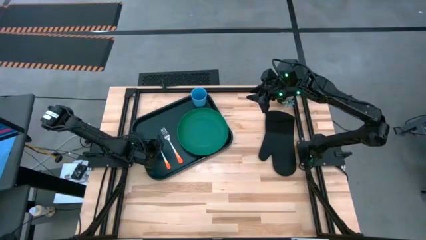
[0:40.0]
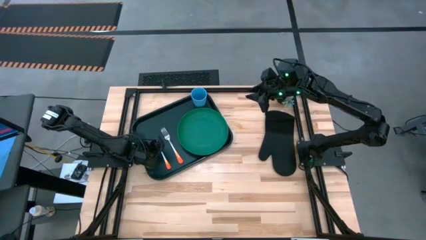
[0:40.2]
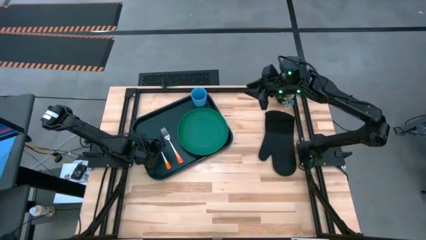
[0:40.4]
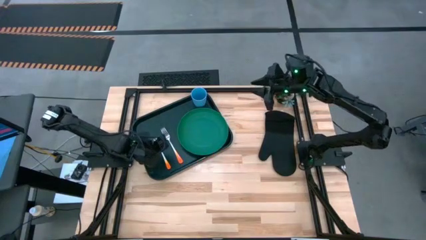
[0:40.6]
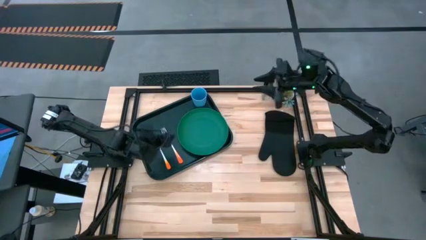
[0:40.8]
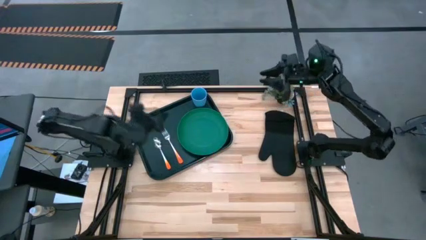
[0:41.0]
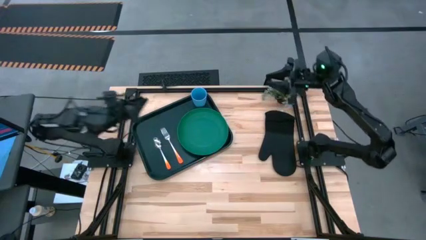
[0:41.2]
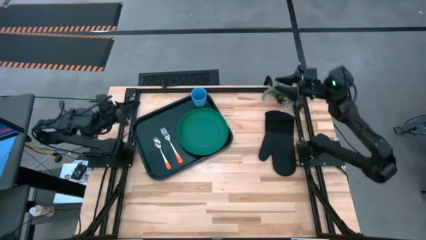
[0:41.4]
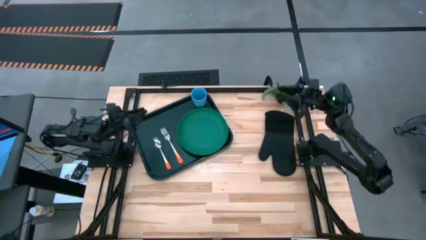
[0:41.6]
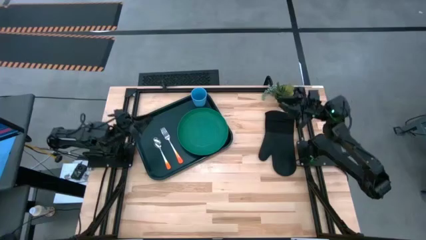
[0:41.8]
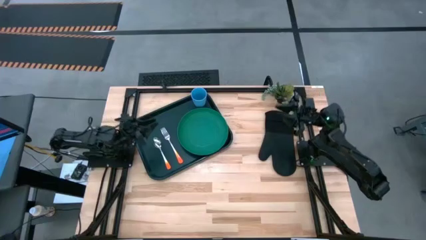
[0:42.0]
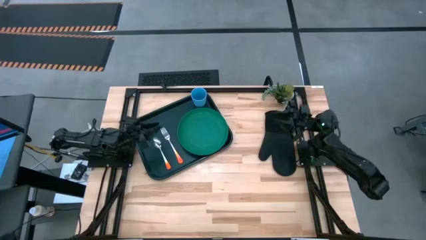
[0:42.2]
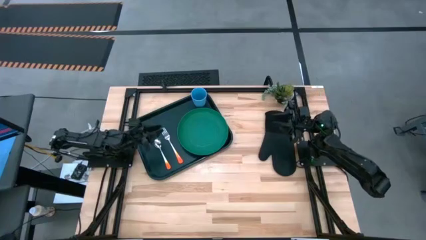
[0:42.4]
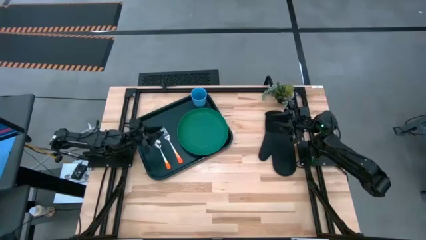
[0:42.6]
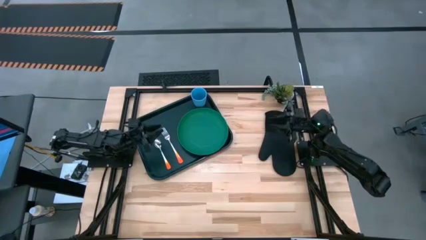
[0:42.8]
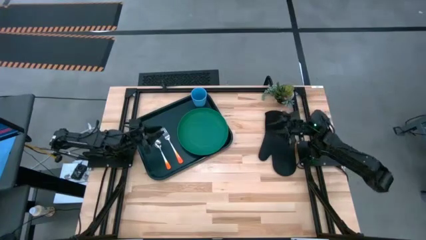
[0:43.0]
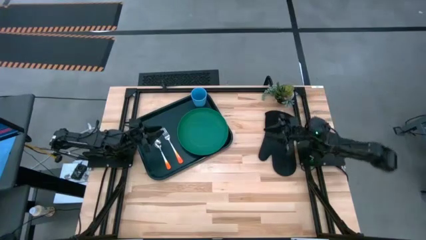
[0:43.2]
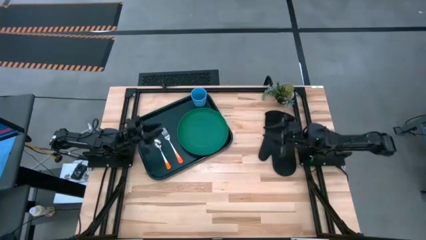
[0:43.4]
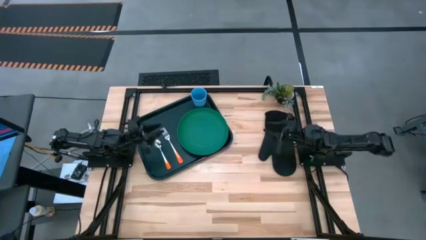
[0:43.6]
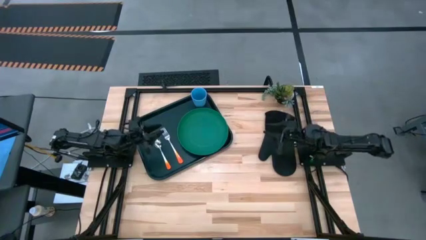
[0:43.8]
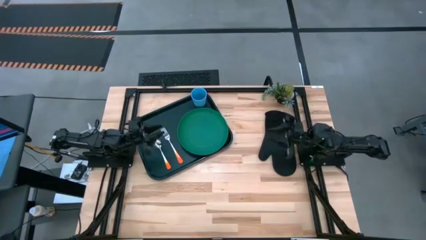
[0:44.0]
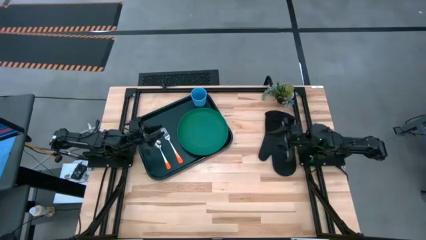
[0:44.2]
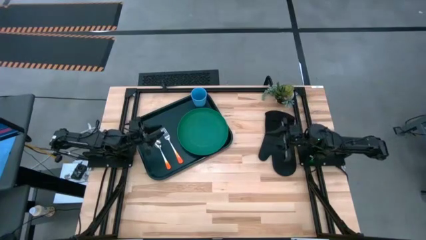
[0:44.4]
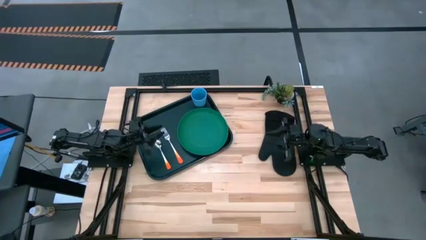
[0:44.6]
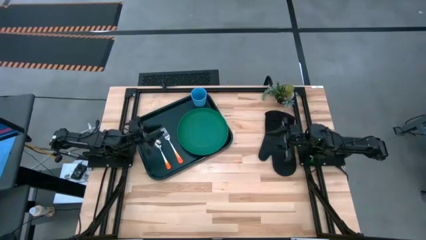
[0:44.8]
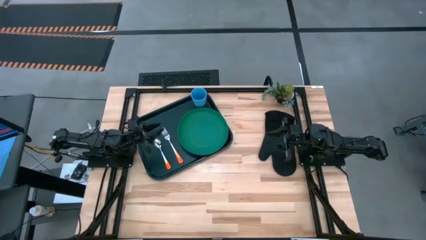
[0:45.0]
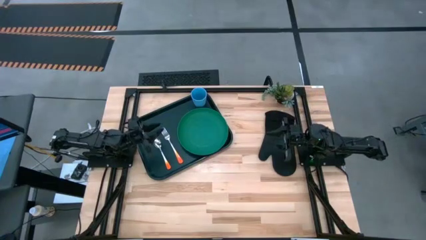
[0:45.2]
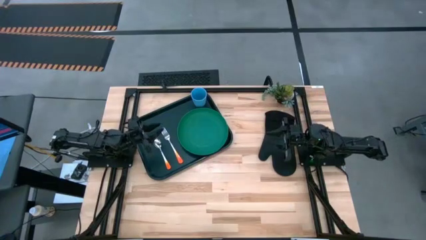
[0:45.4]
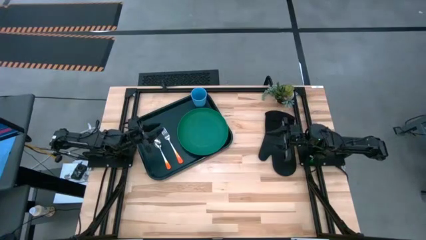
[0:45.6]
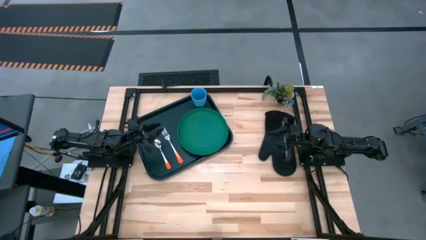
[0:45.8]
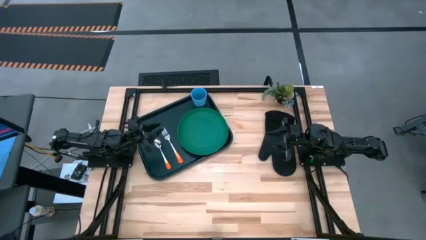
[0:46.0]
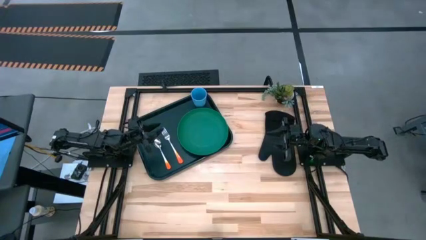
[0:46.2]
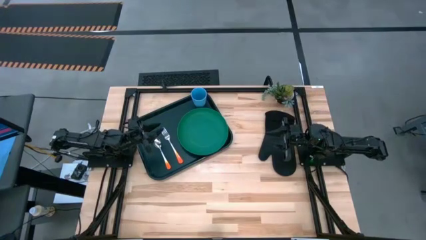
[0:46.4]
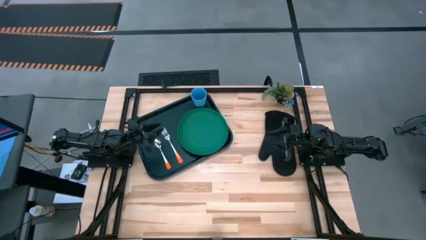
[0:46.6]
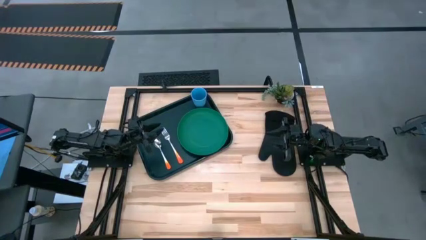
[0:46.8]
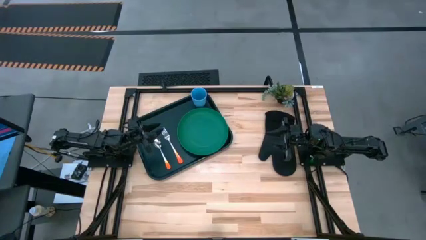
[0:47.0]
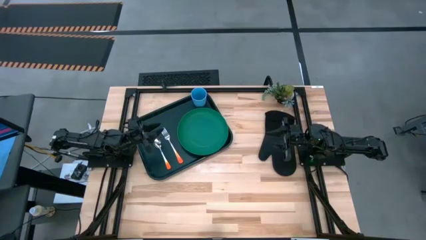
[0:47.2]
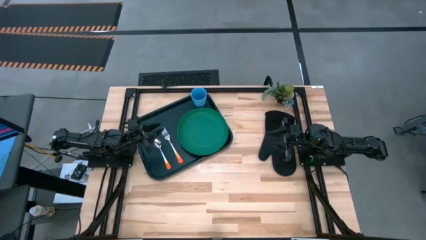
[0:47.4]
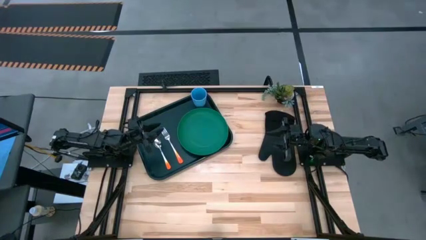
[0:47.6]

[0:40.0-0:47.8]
Task: Pick and place plate/cup/fork/spoon on tray
Return to Home Position

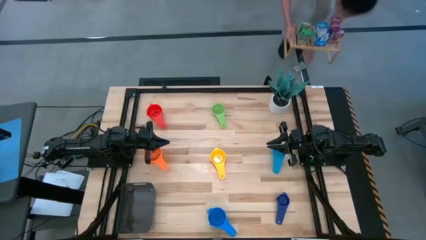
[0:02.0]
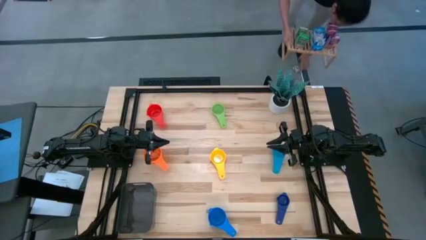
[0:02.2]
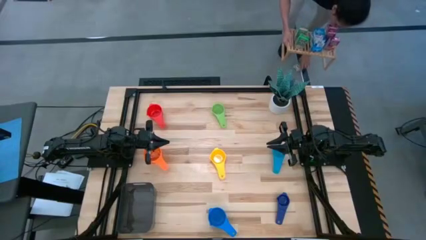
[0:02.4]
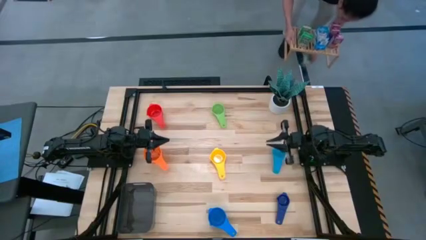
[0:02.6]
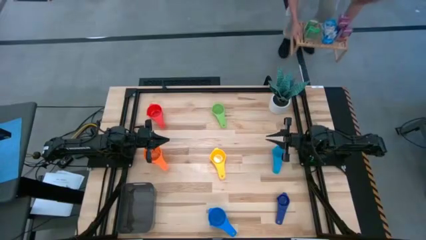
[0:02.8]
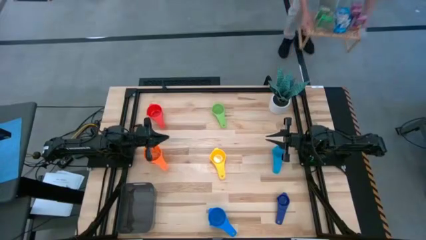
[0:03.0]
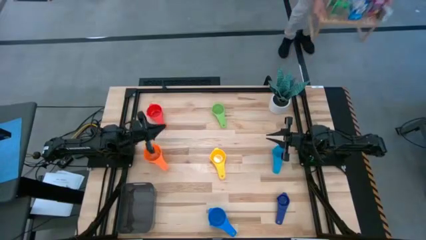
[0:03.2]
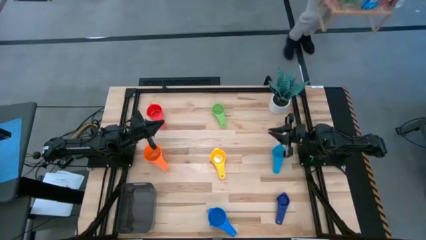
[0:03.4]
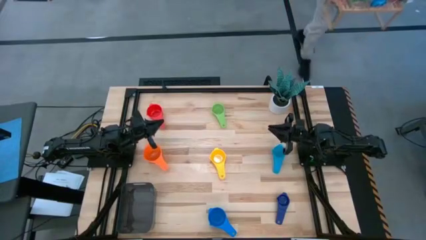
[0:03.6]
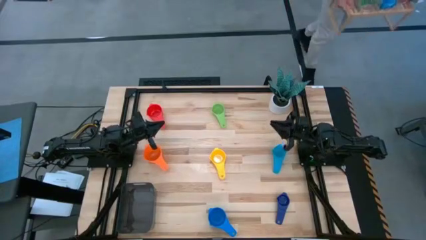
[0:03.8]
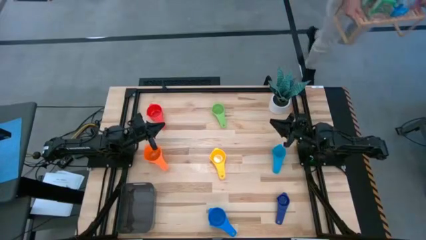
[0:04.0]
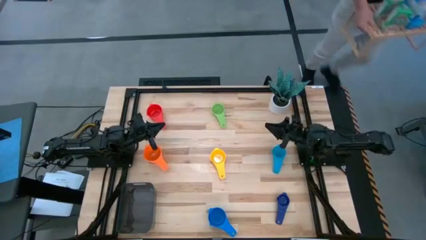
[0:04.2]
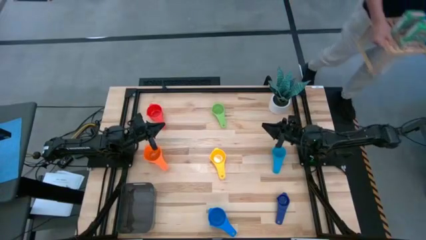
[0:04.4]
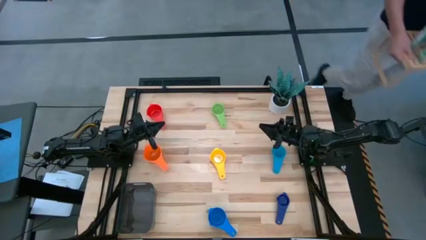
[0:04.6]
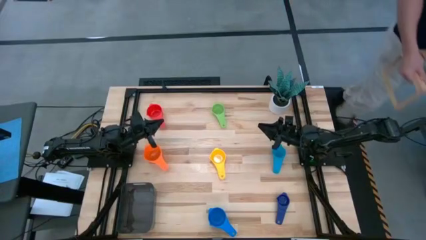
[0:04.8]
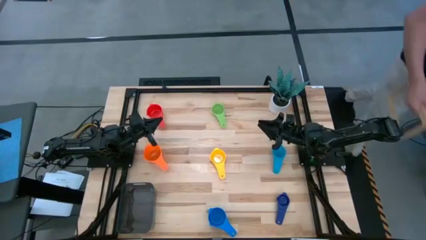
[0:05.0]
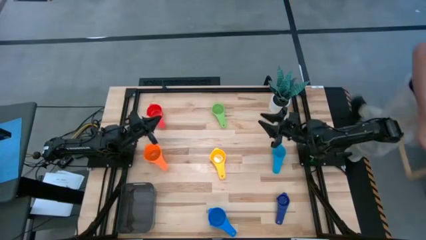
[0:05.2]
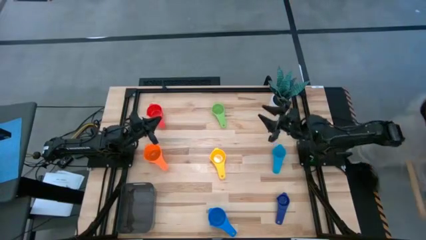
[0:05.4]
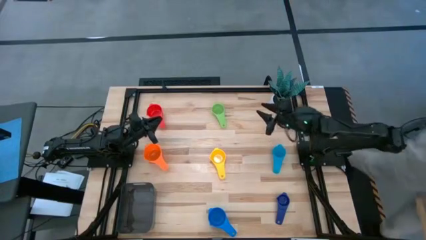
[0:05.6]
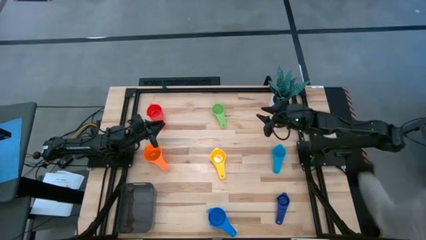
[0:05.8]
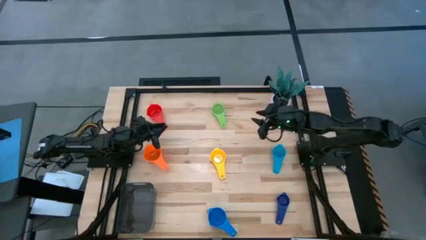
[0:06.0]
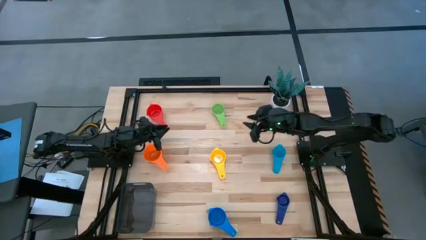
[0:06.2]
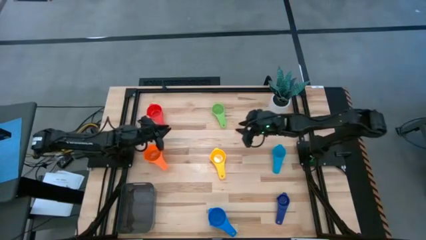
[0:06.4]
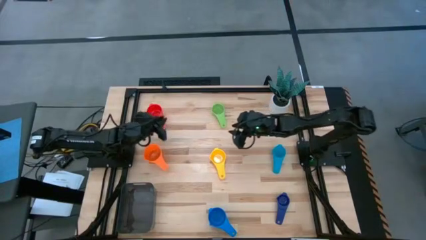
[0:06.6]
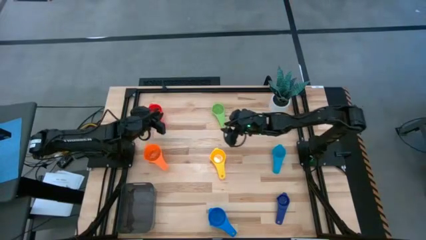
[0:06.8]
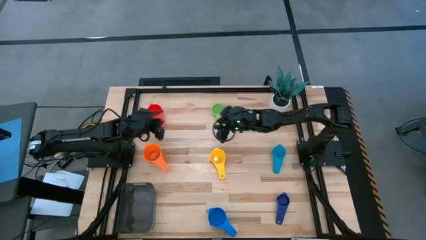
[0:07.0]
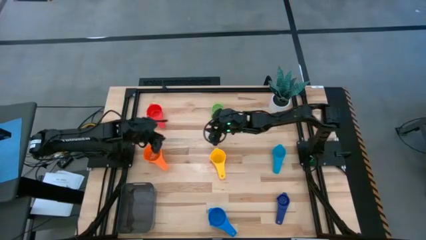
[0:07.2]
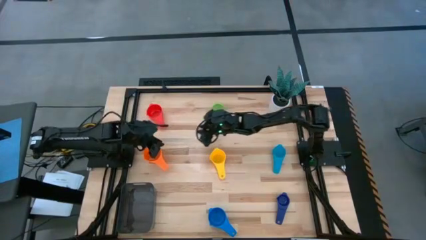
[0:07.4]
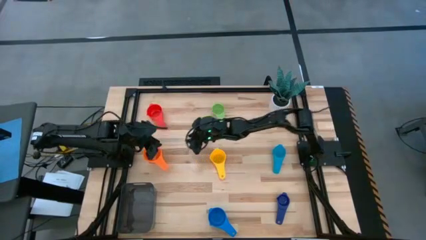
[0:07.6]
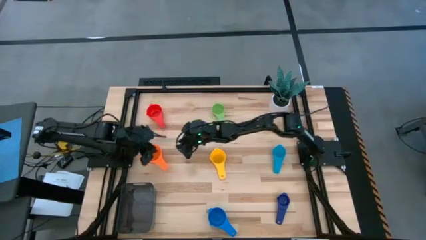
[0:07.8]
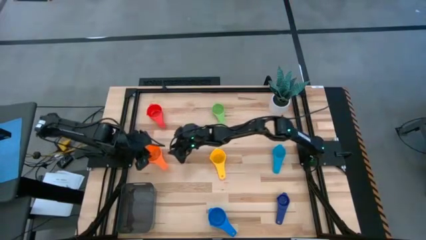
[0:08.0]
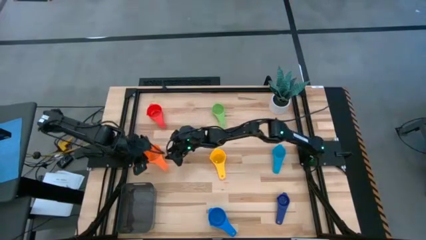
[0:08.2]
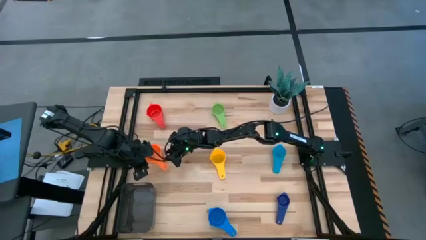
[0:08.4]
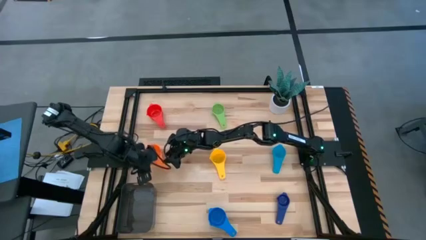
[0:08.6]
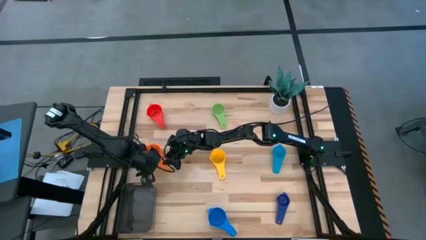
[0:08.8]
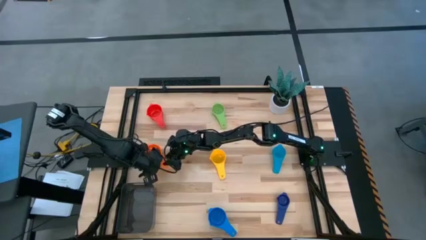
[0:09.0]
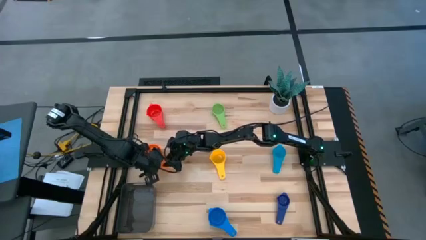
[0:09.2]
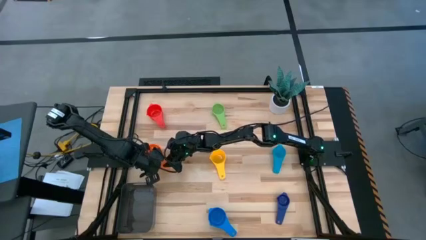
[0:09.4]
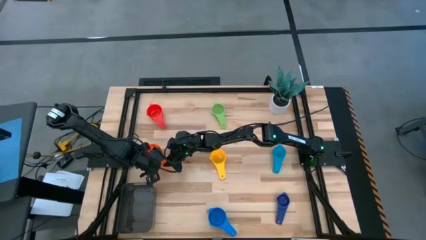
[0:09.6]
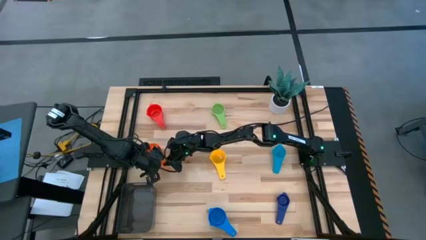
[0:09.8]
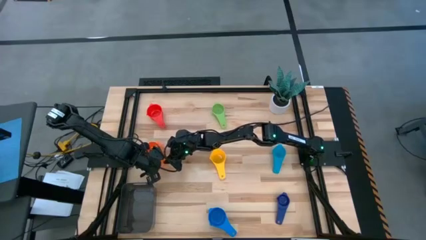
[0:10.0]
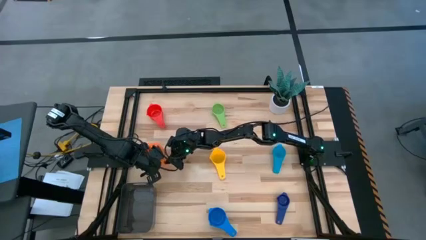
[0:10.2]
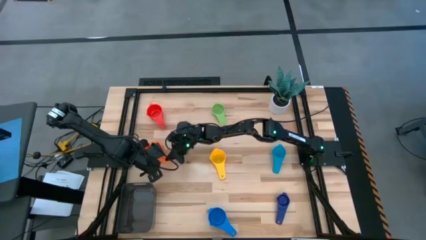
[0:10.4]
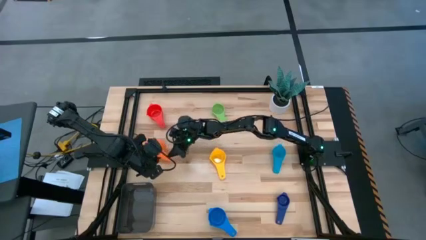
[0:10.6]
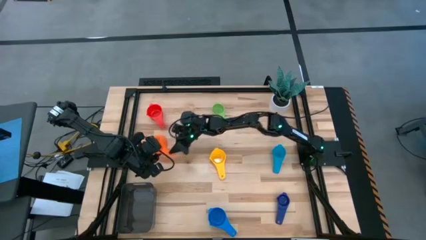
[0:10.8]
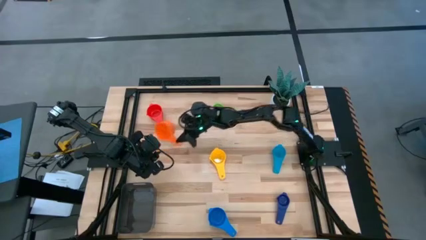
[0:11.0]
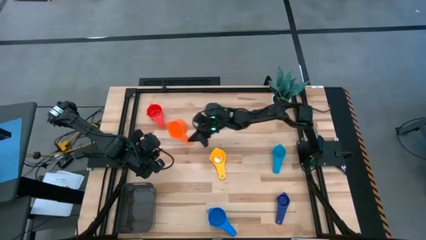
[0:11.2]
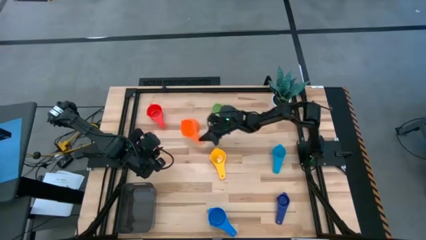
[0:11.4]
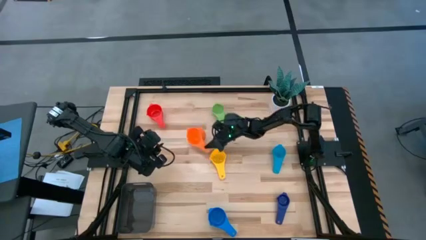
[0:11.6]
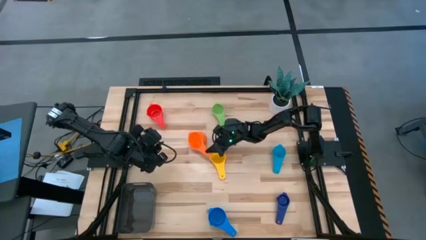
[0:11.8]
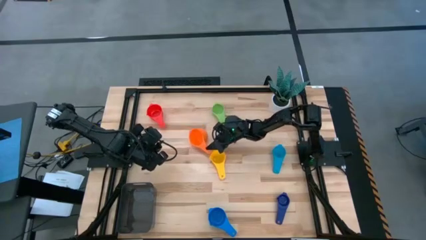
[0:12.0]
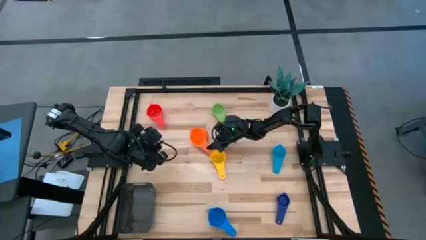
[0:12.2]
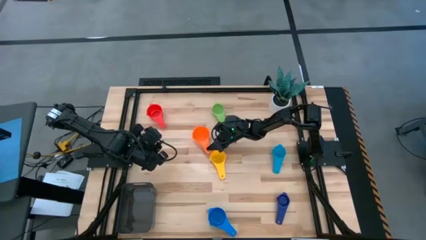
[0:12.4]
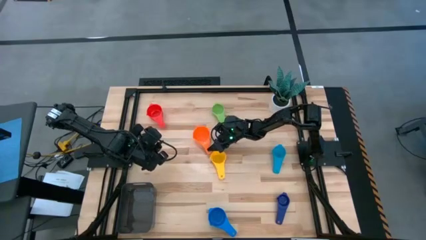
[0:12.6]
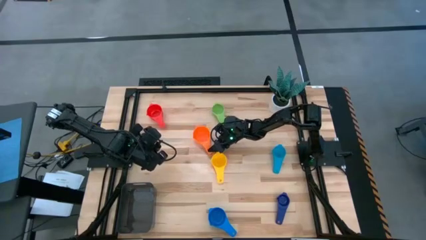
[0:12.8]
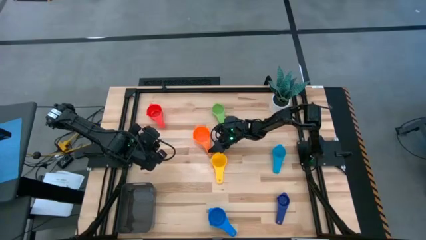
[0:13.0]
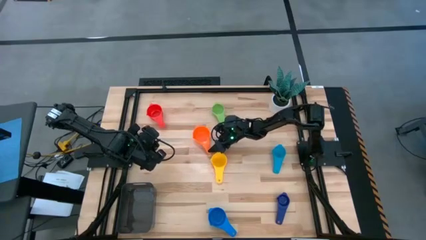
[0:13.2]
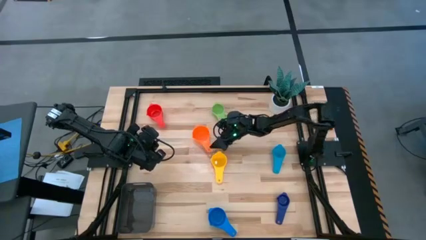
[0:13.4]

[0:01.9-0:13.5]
Task: Nest measuring cups in basket
Move the orange measuring cup to the center
